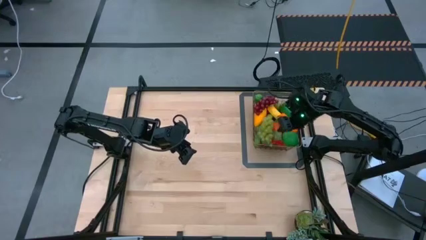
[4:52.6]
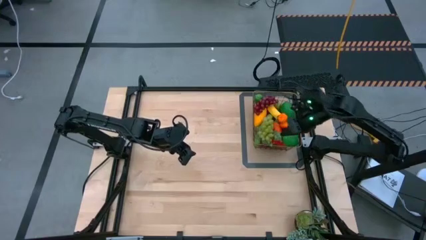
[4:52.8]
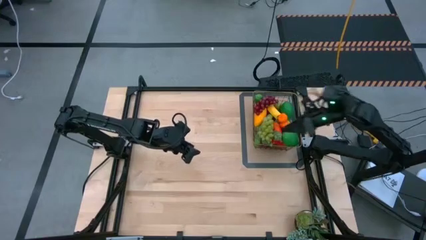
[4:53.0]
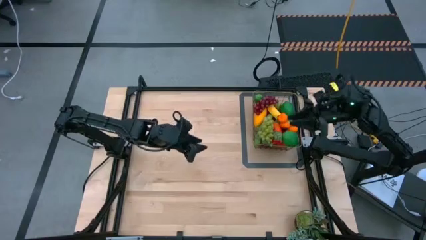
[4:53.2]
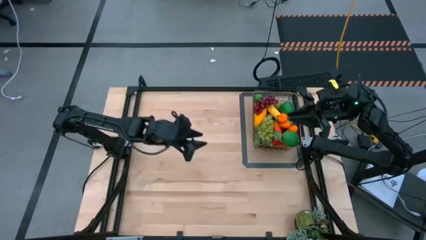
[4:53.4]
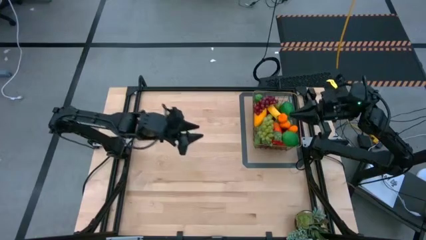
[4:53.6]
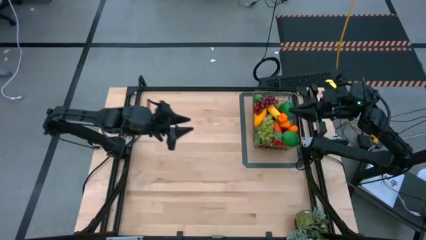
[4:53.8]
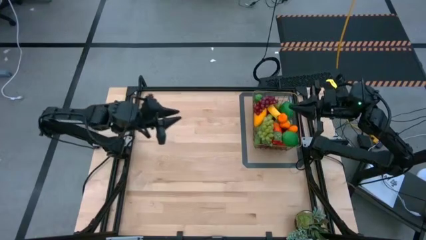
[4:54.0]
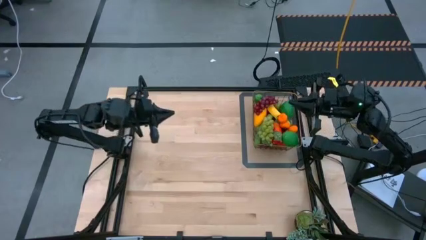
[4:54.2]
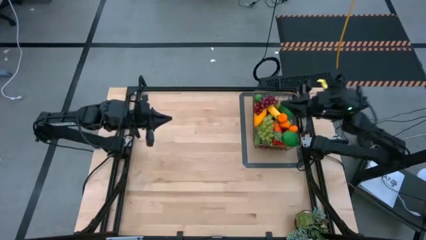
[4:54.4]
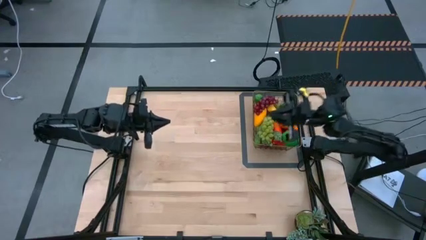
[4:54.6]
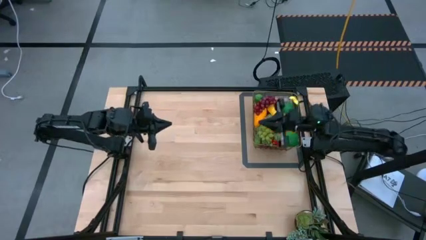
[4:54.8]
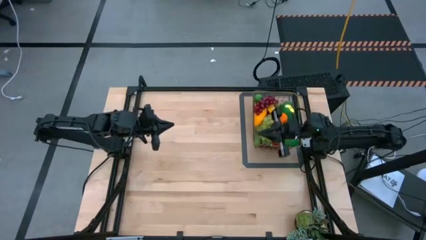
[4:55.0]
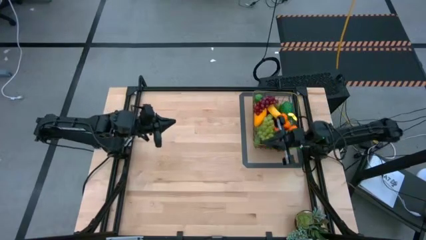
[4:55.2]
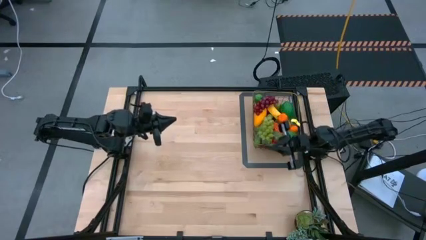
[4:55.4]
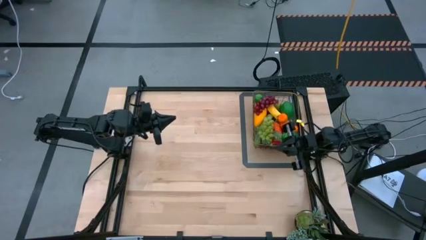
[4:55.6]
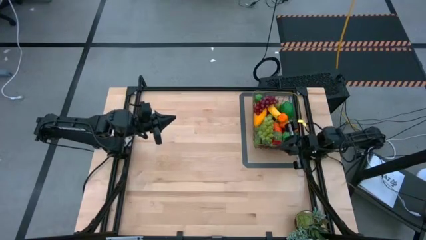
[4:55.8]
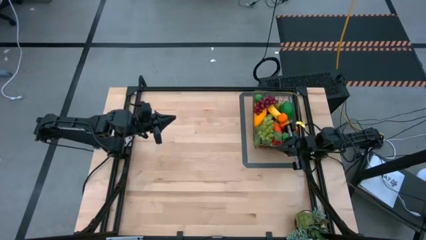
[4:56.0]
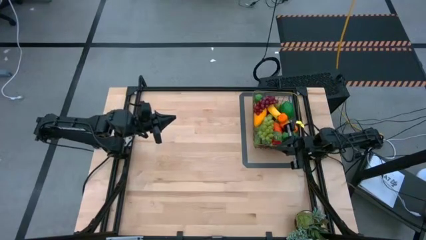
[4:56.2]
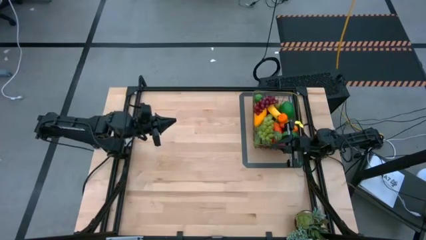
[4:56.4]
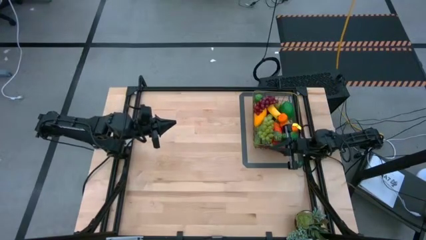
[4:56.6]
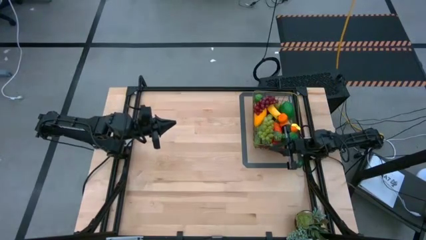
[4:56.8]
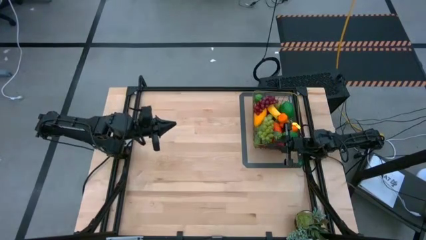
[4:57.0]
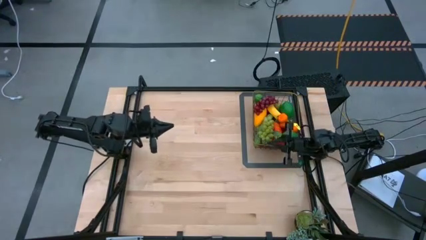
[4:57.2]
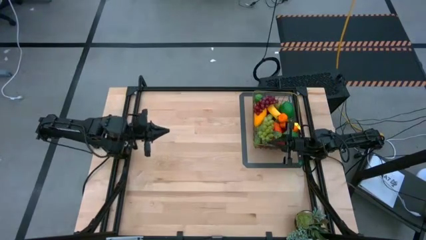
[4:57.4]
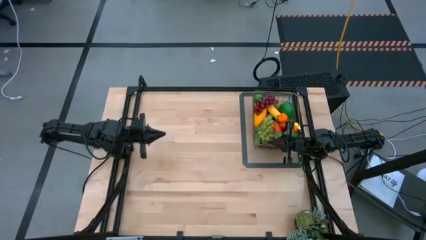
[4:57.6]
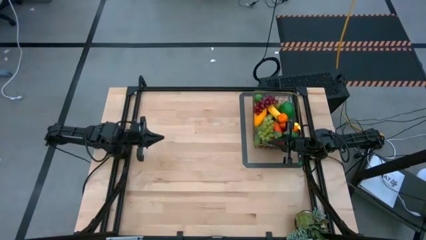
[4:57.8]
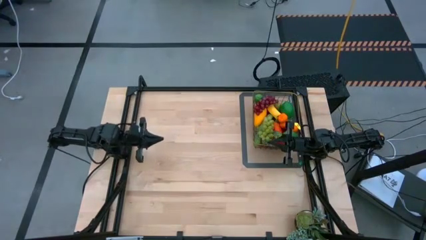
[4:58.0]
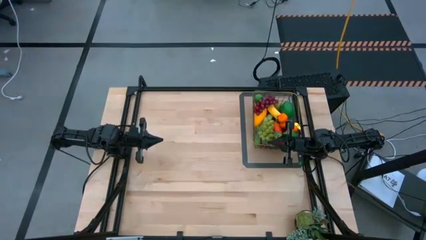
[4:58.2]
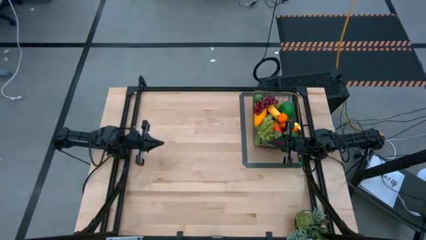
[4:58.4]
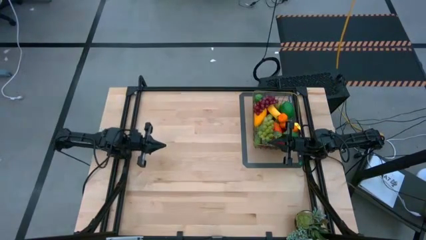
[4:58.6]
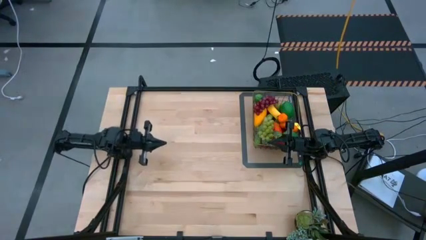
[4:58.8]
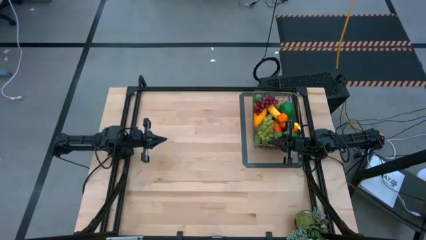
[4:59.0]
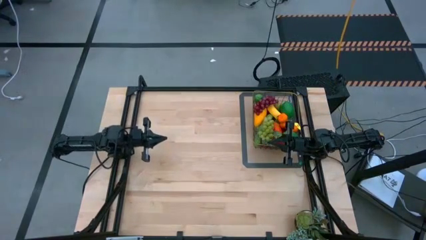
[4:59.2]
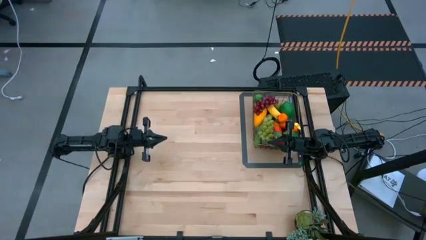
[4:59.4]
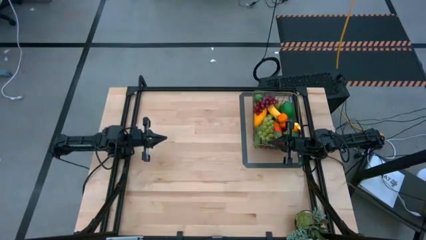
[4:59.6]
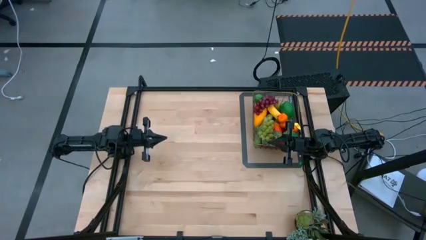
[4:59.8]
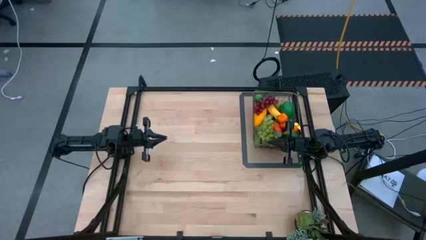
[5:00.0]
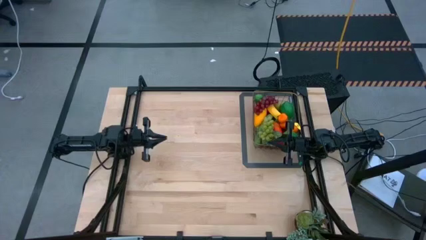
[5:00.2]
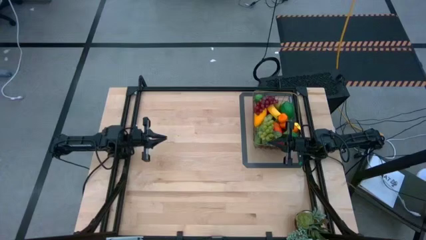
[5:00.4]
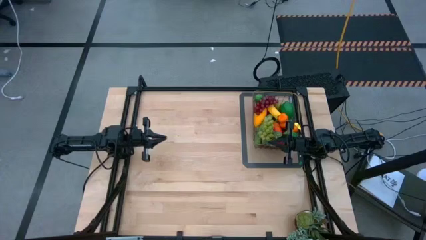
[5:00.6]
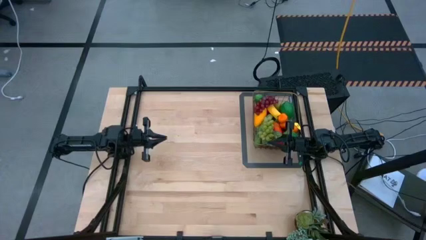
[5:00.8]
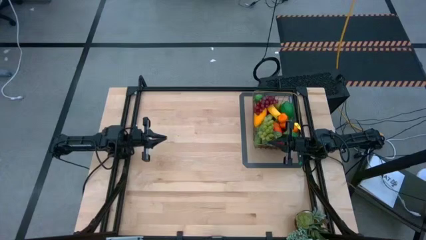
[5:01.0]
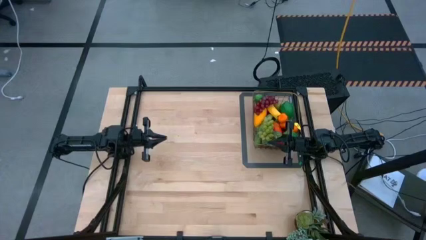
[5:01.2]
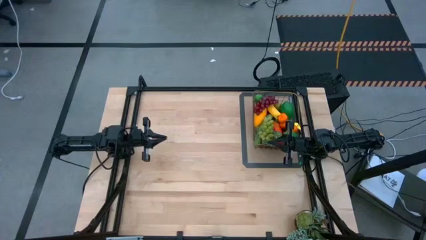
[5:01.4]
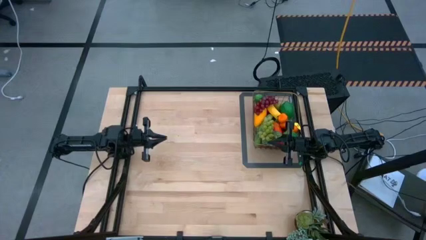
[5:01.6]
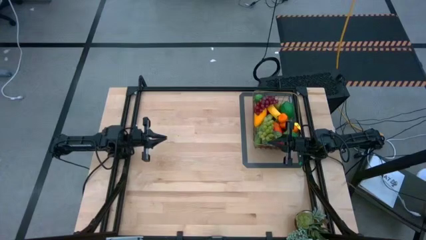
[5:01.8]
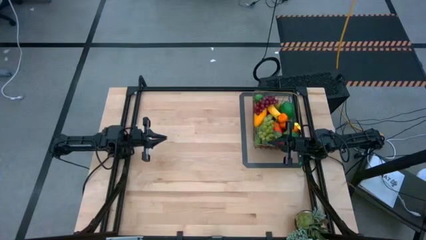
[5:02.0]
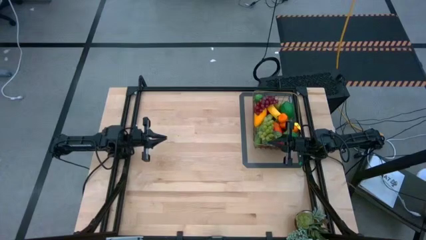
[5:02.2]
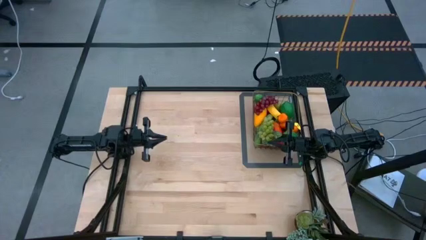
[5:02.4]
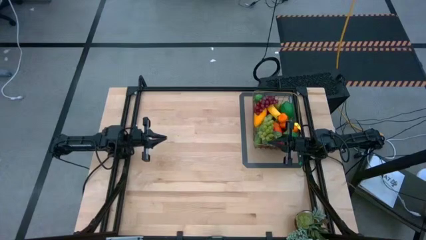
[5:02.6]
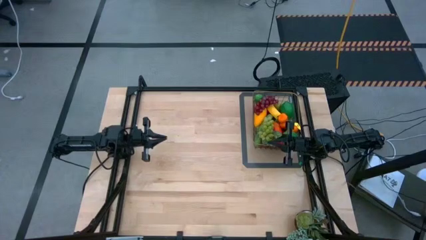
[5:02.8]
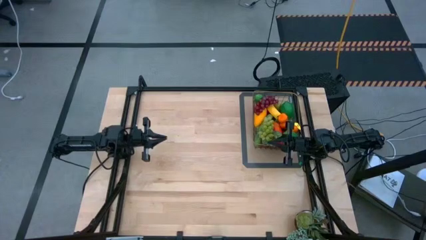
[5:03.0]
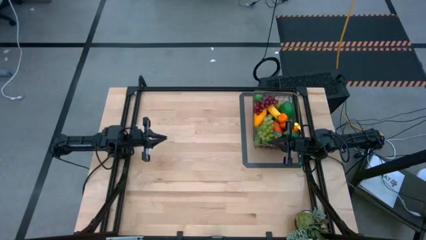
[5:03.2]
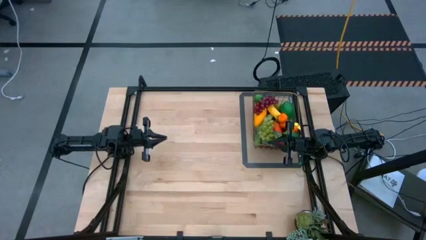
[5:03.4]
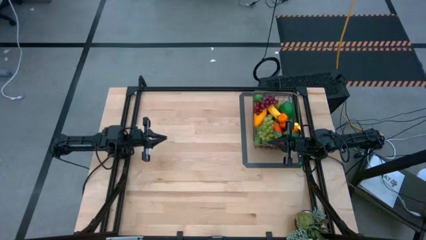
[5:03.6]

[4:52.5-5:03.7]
Task: Build produce basket
Return to Home Position

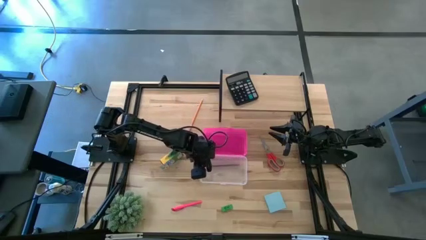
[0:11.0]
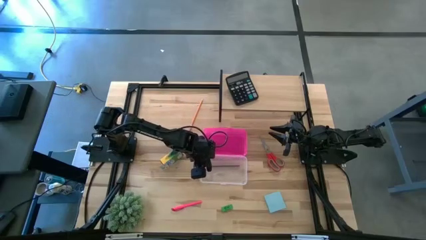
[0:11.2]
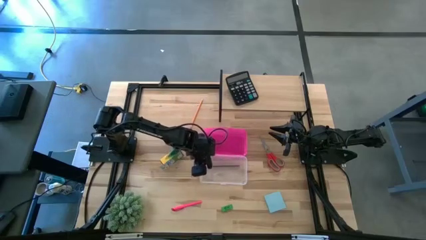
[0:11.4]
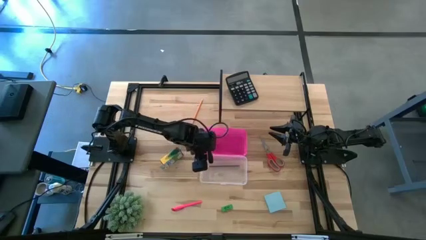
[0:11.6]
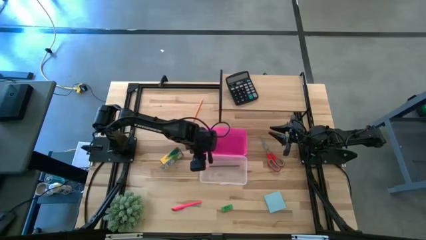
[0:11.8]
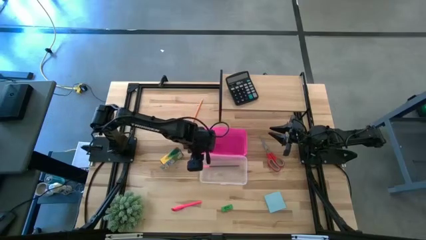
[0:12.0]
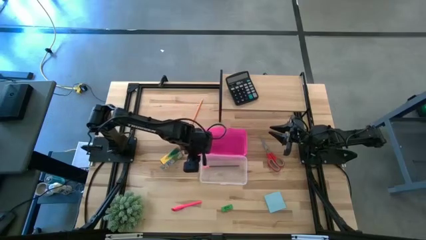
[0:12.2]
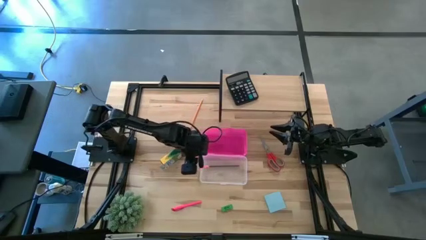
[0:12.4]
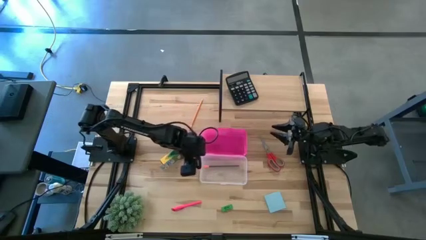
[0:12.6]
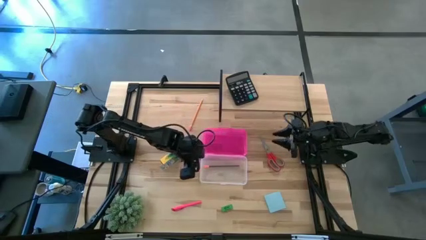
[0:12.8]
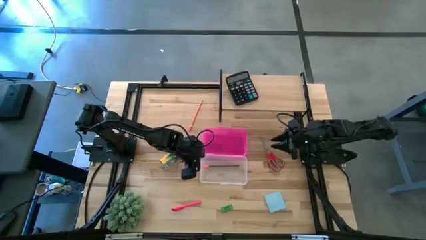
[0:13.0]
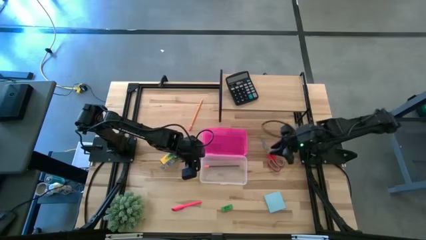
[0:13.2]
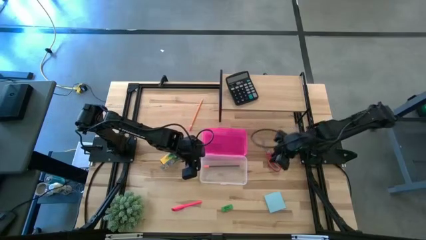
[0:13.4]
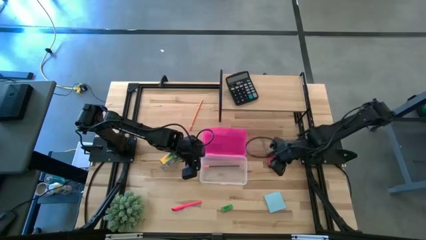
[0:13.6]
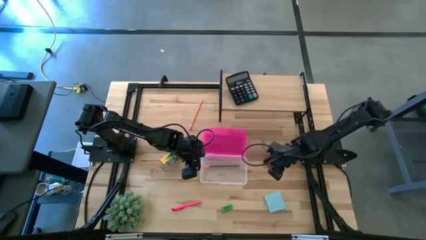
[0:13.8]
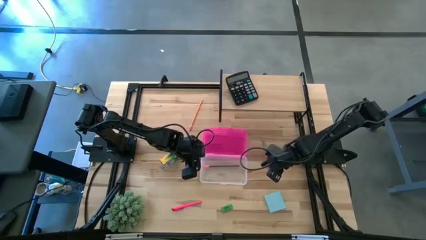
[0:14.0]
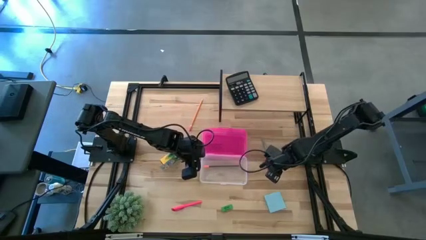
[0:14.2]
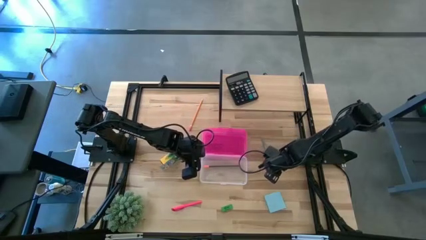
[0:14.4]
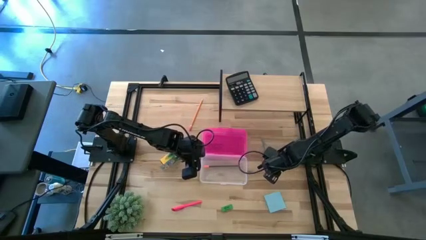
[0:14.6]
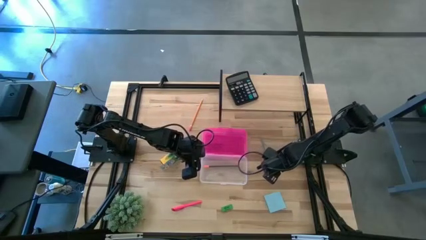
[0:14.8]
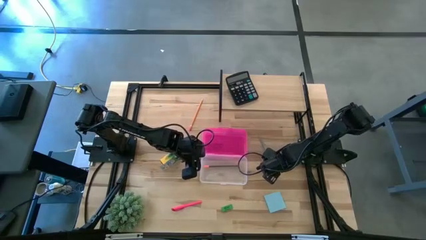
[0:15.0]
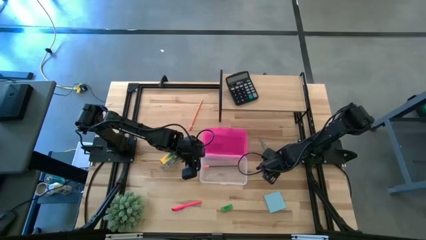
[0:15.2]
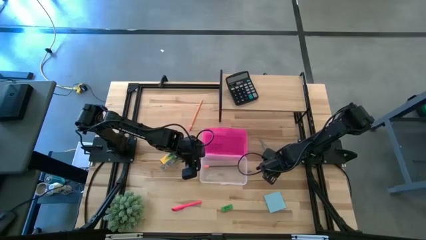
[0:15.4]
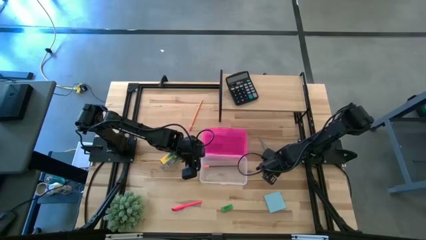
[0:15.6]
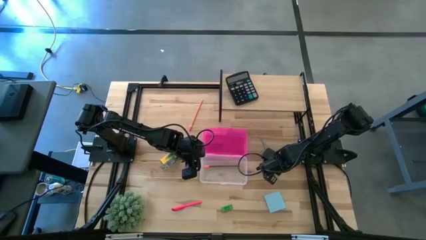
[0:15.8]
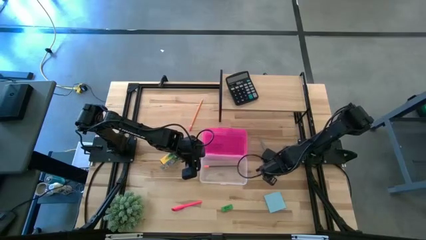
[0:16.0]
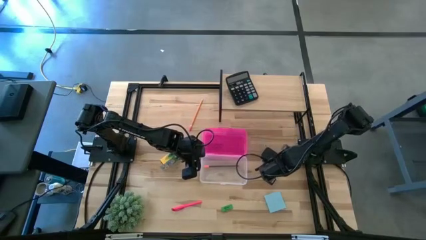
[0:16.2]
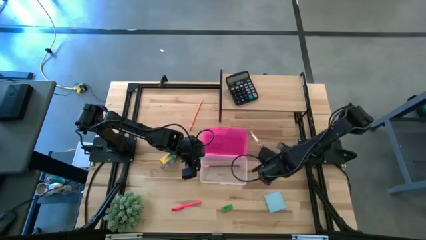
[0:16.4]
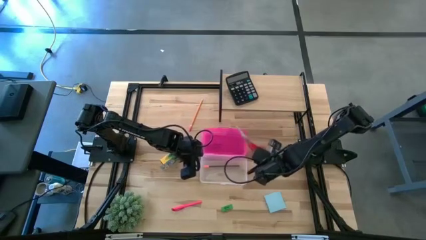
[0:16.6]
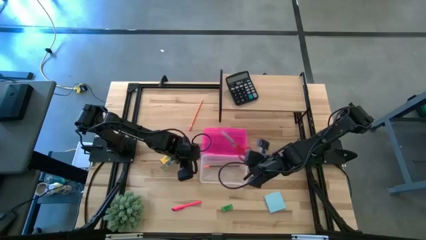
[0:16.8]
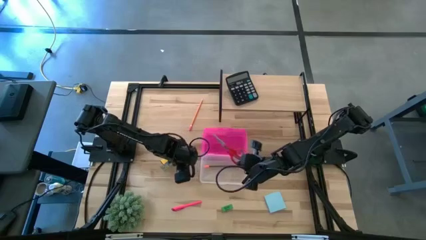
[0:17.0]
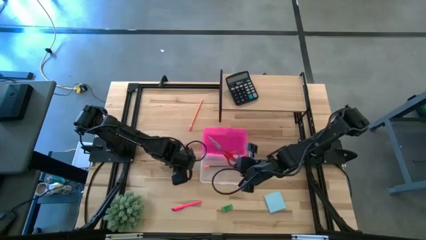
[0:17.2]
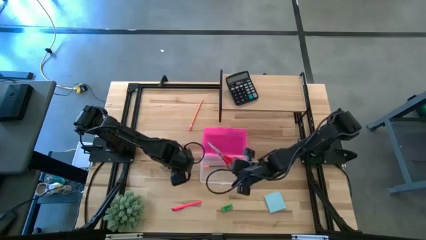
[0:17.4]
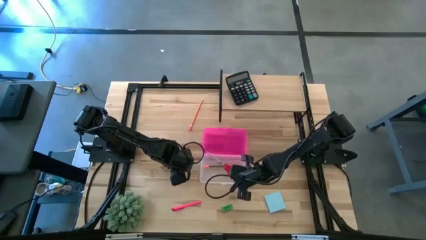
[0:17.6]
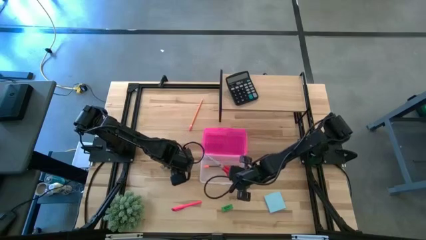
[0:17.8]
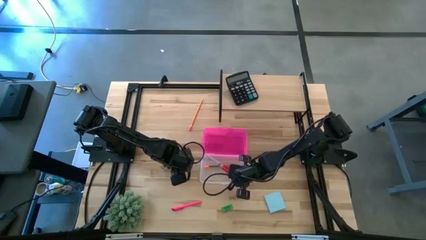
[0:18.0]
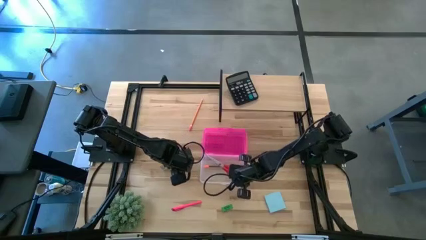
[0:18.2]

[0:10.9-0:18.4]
Task: Pack school essentials
Put the red scissors into the supply box
